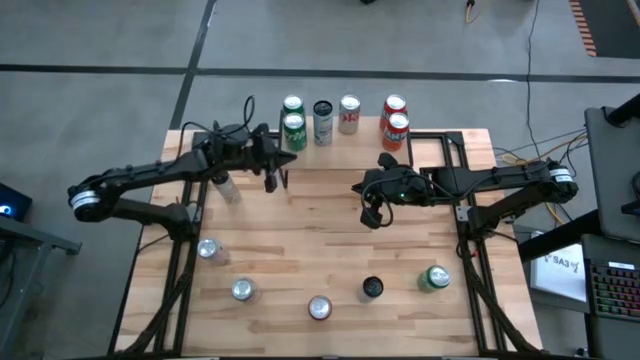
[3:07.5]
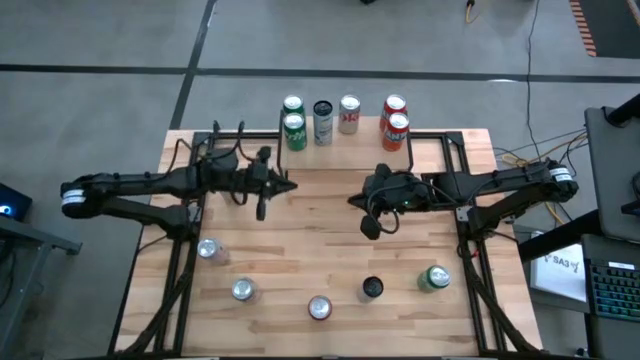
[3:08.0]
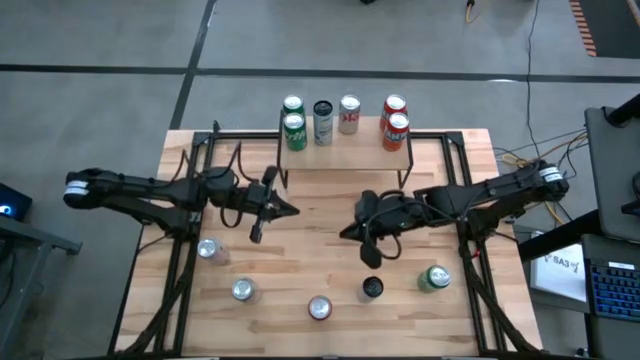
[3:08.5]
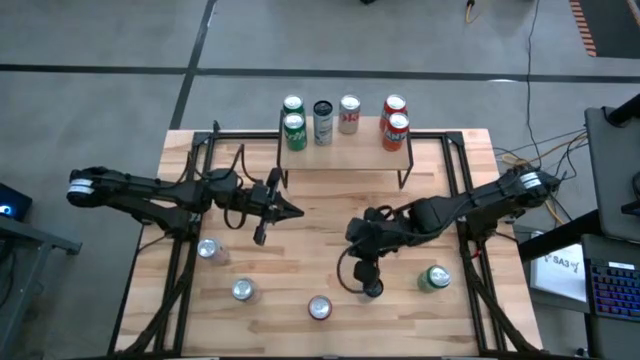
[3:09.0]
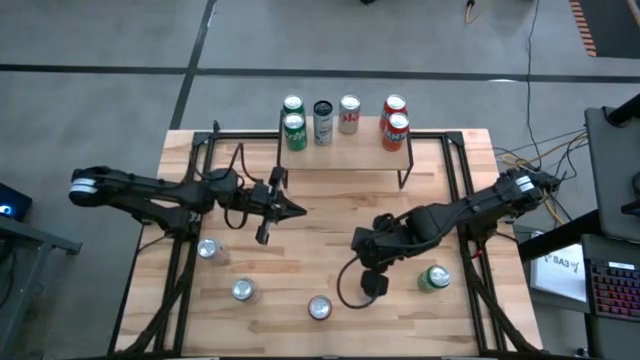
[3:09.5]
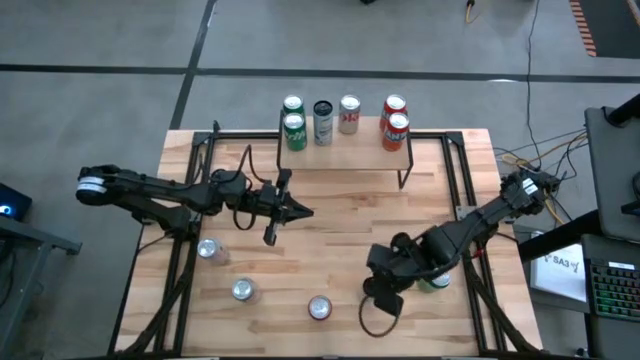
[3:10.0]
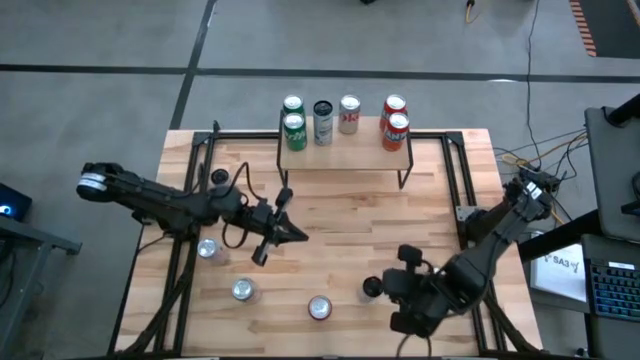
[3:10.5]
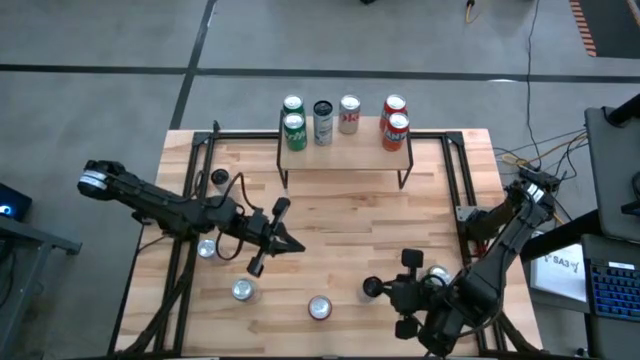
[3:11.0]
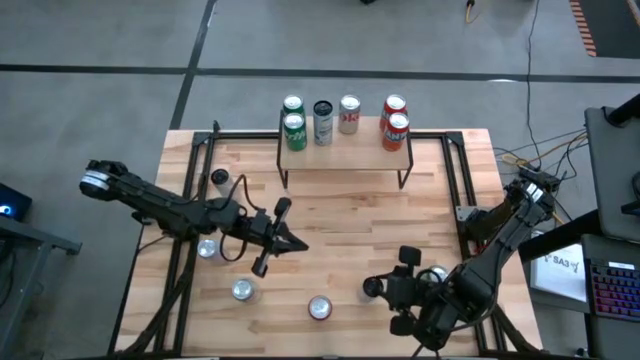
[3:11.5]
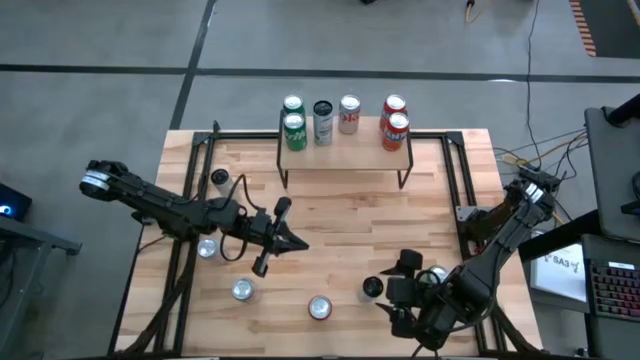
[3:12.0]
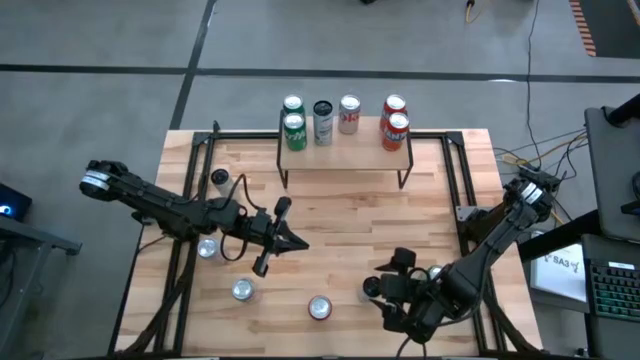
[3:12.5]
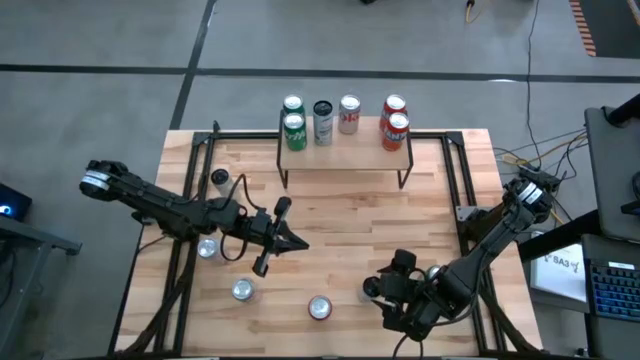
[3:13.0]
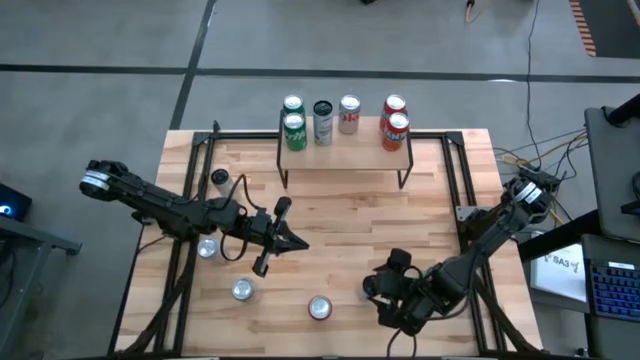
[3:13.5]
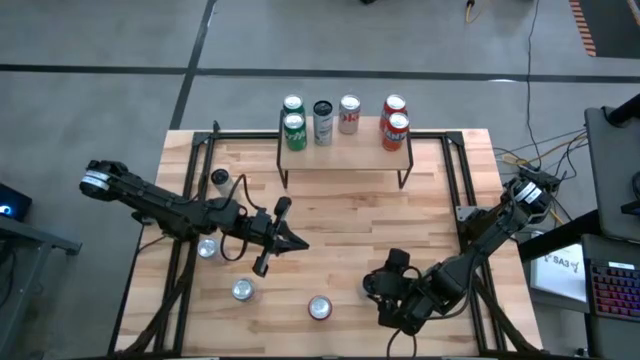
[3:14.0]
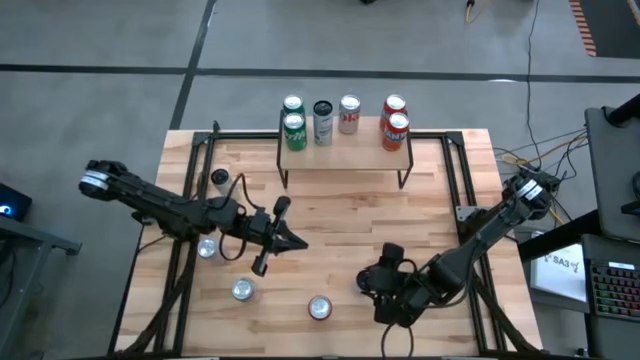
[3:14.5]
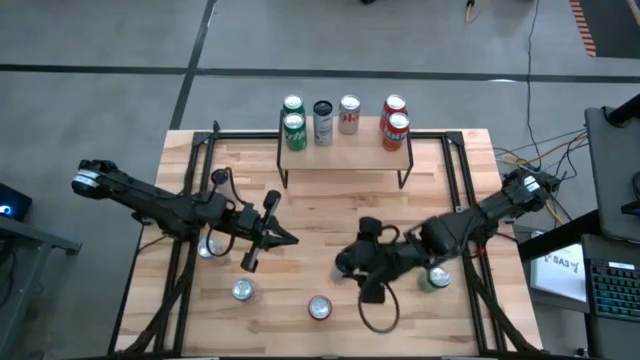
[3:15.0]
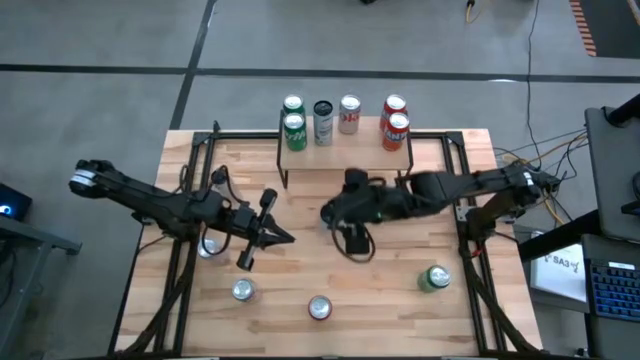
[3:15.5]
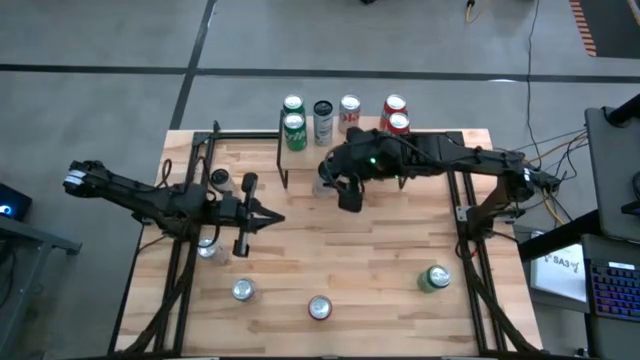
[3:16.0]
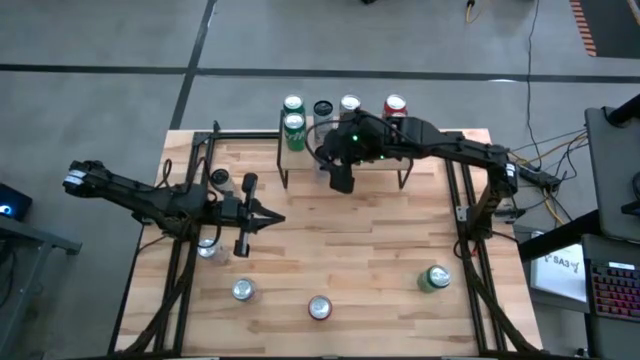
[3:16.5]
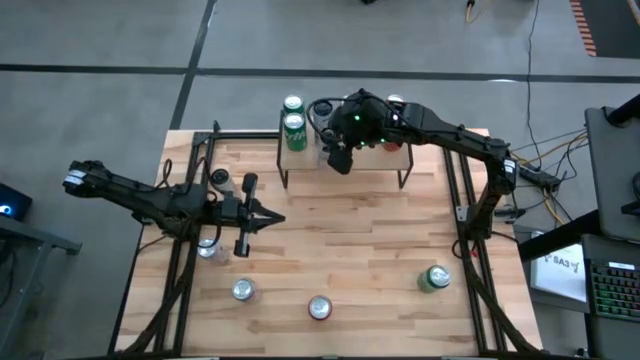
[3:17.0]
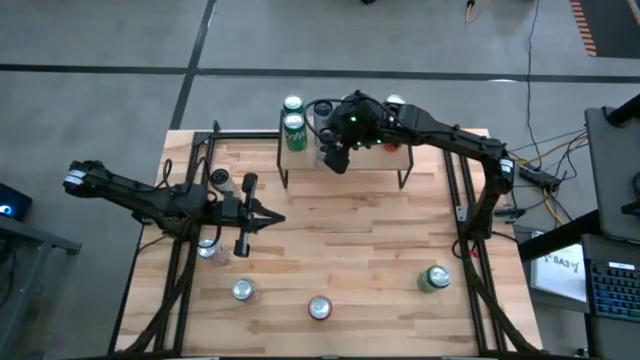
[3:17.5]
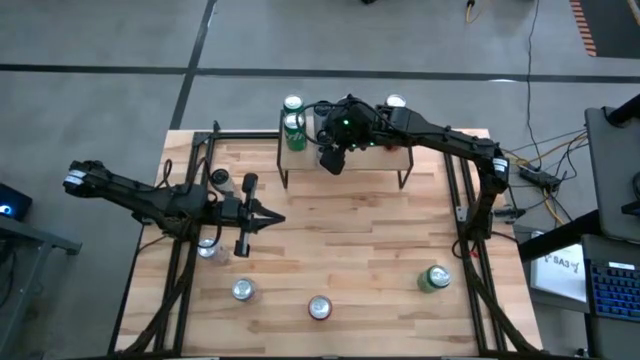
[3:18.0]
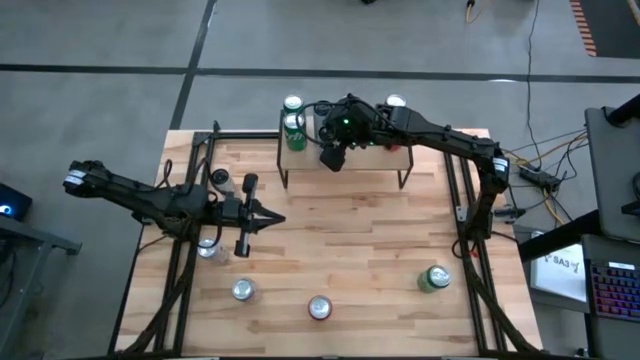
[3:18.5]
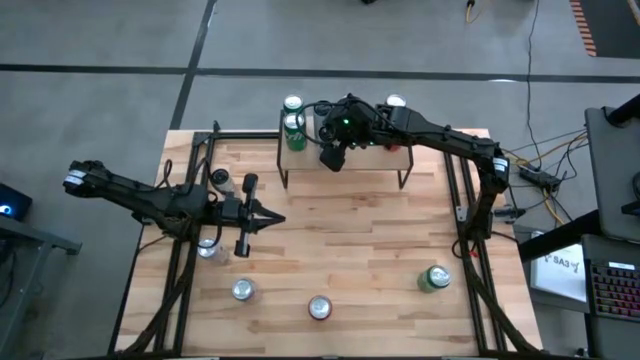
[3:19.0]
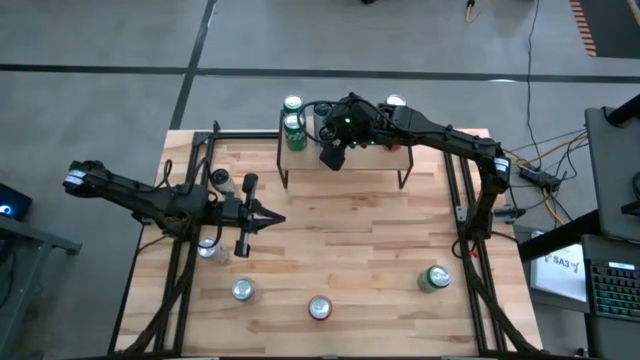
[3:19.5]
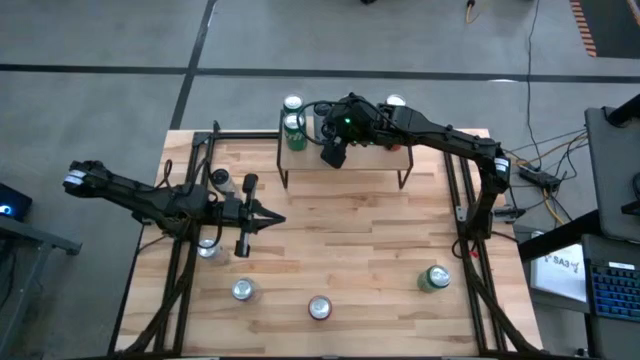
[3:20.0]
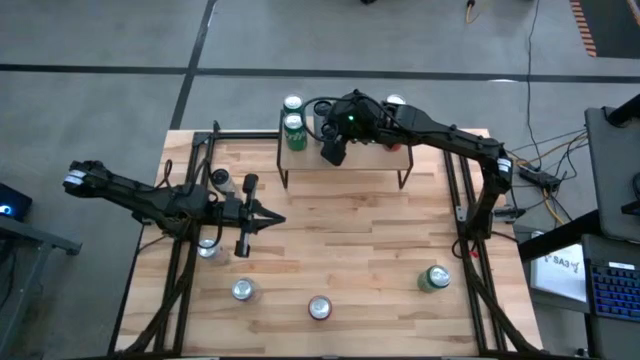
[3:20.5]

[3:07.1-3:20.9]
Task: Place canned beverage on shelf
Put the white blue soda can on the shelf aligned with the other white blue soda can
